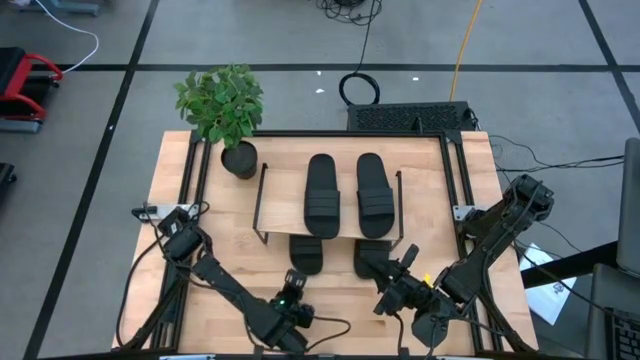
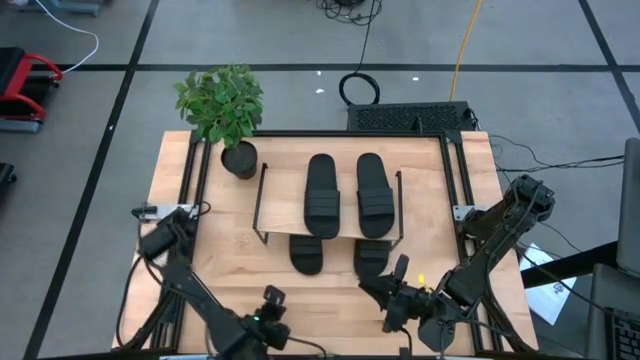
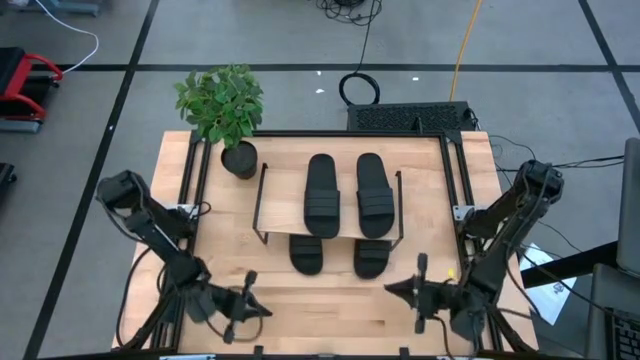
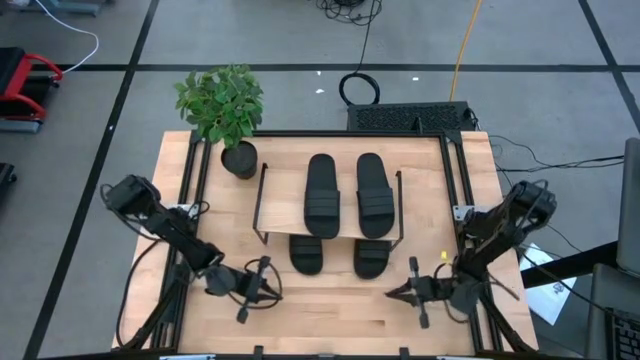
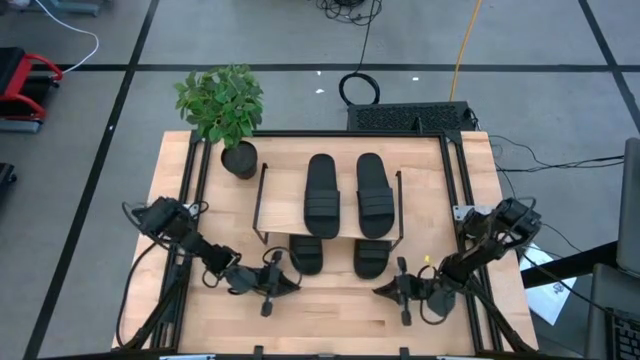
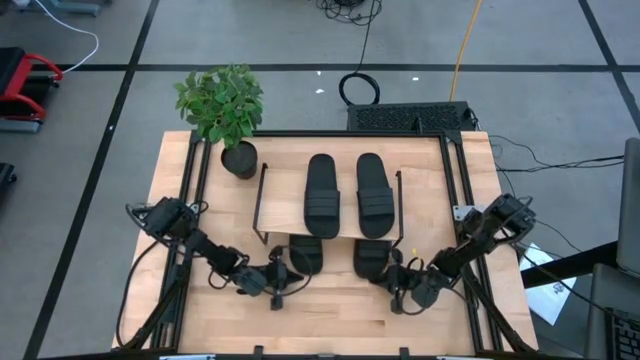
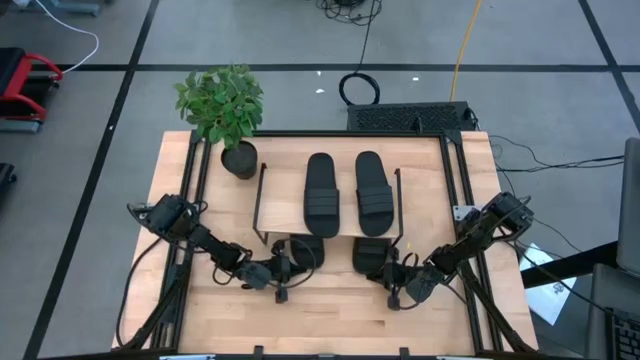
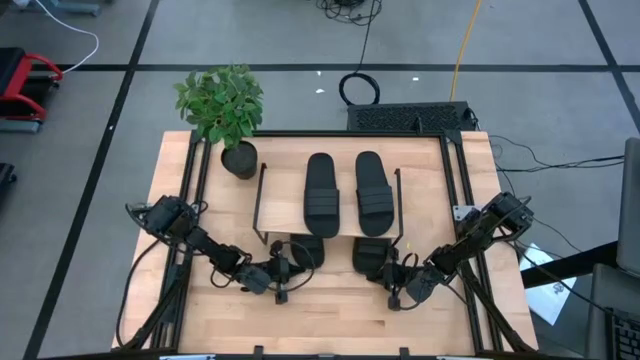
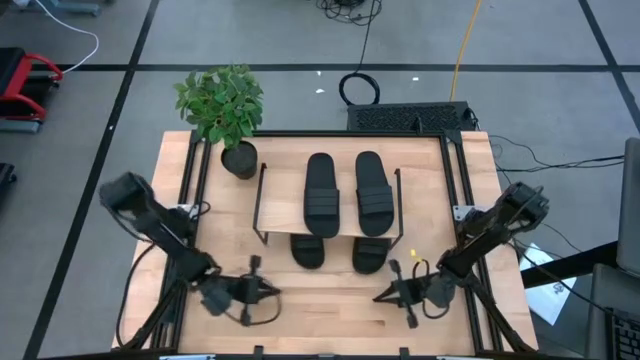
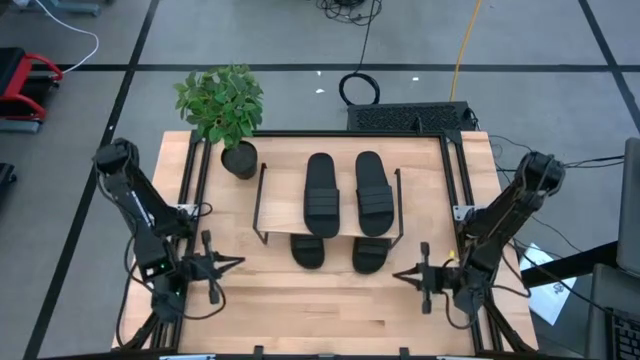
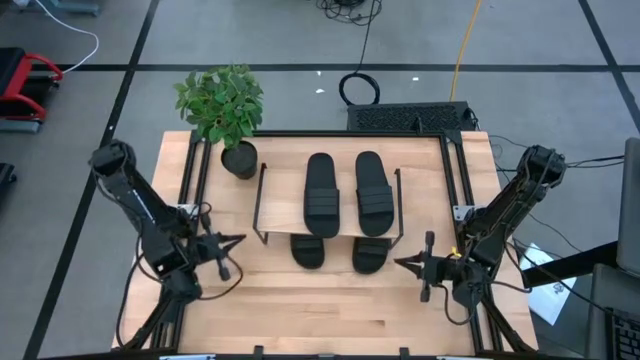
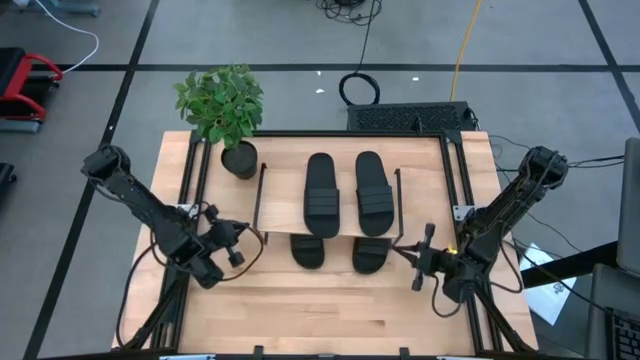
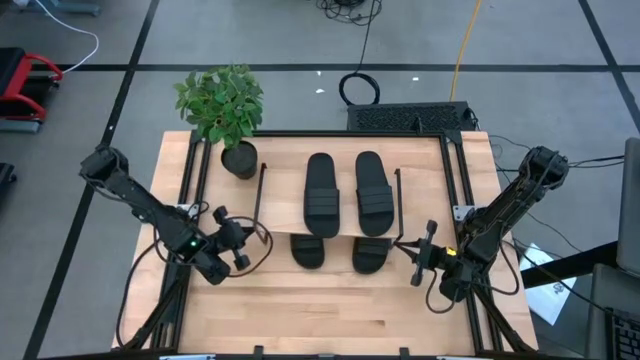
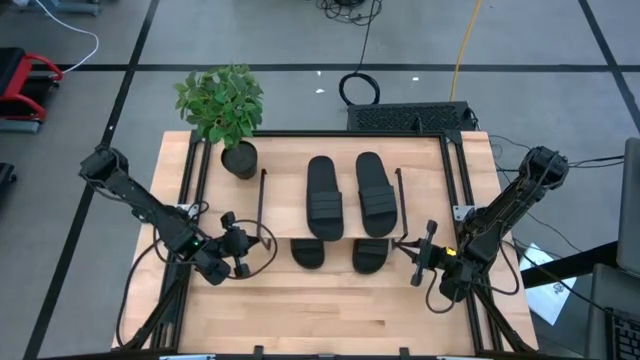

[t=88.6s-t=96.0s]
Task: Pick and place slides into the shelf
Adjust the slides under the shelf and on the shelf

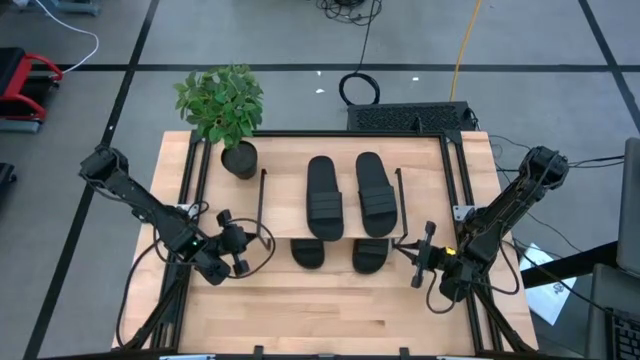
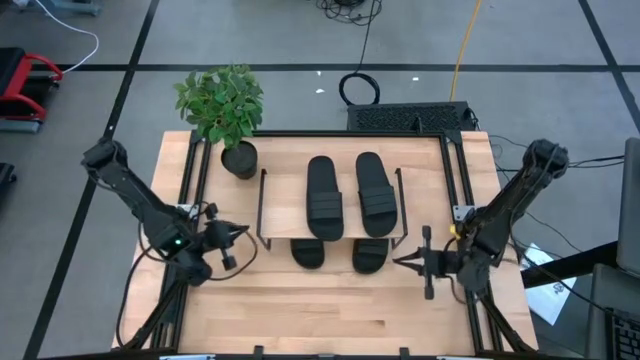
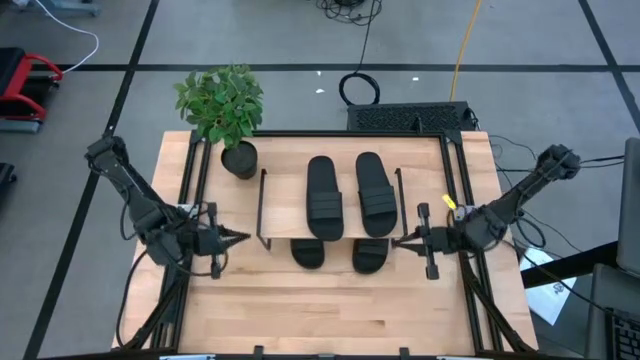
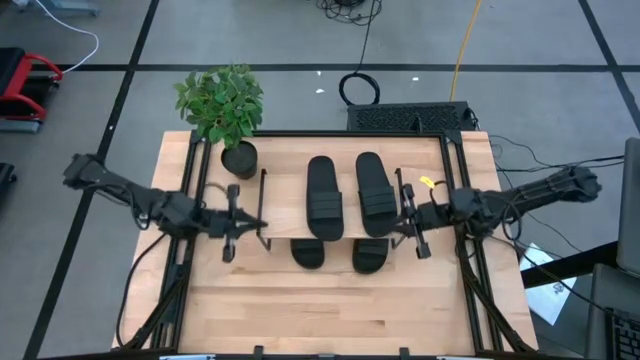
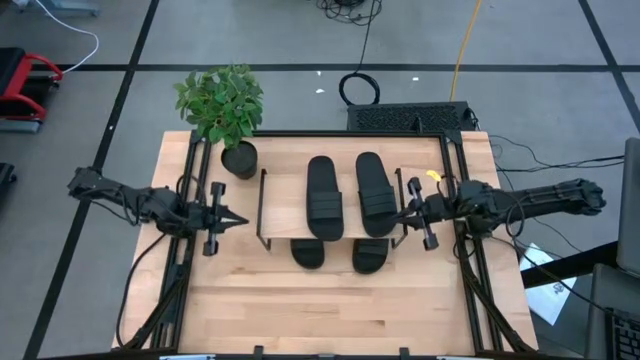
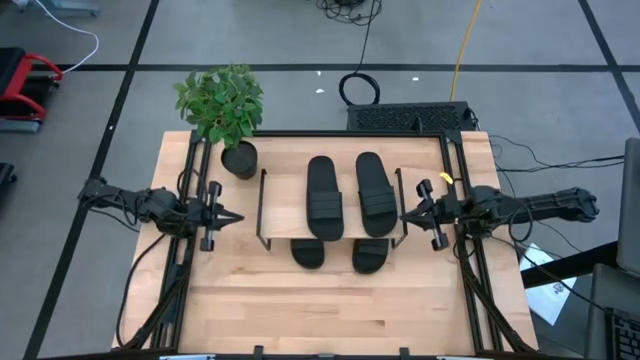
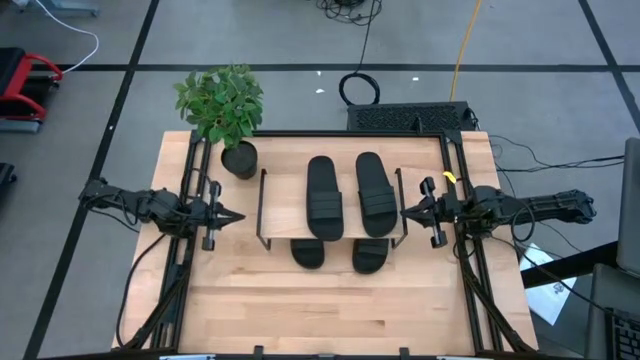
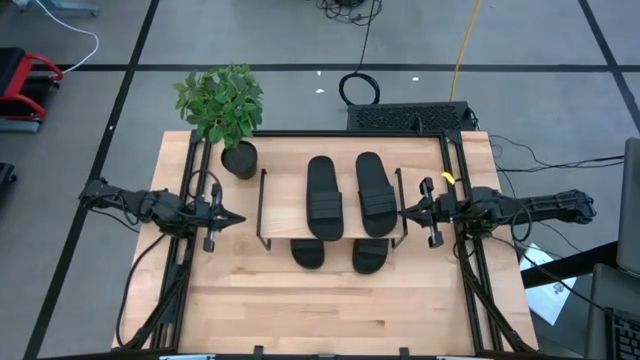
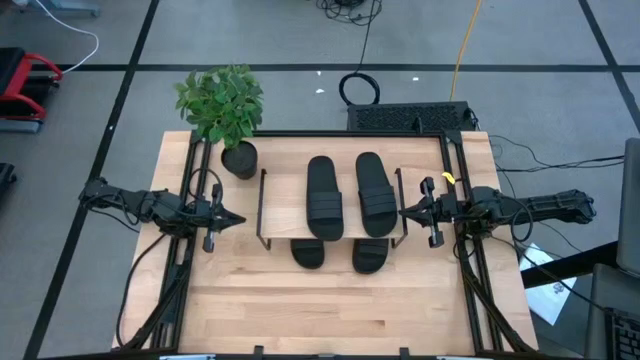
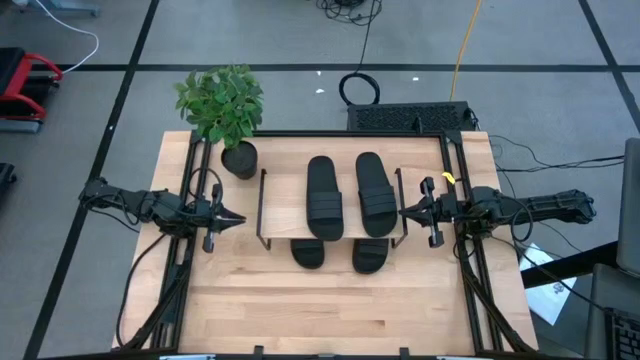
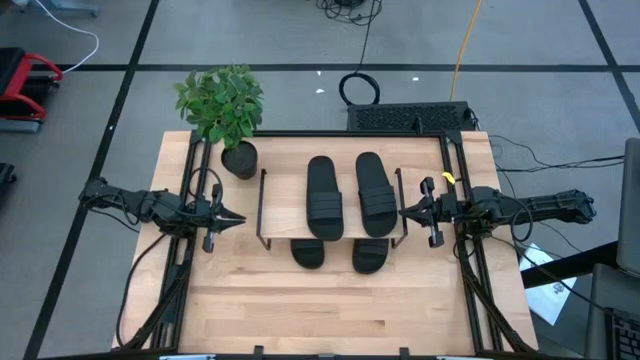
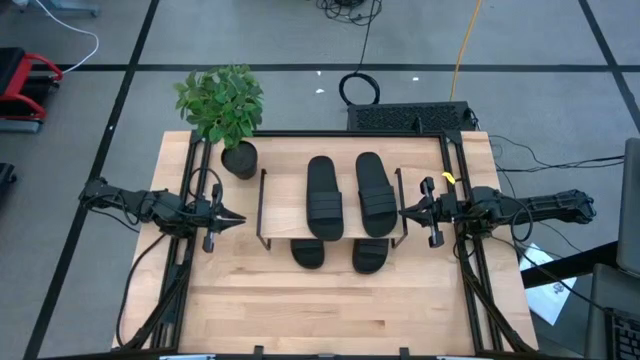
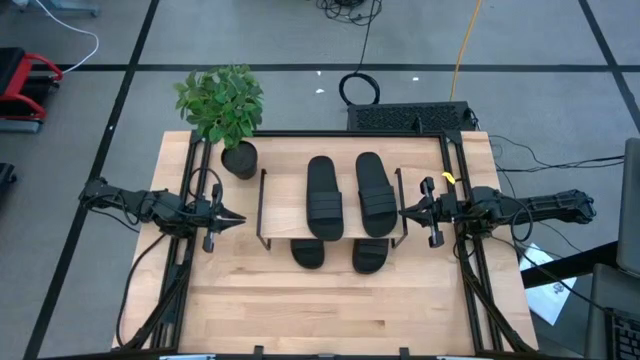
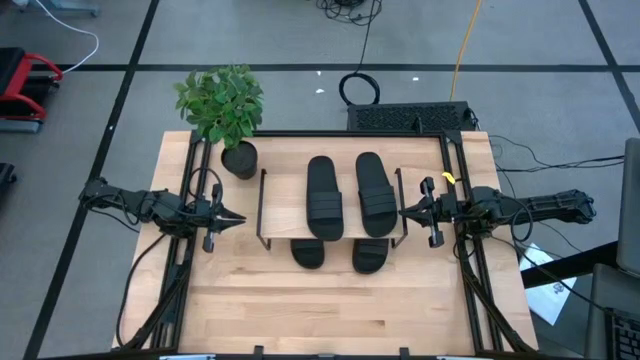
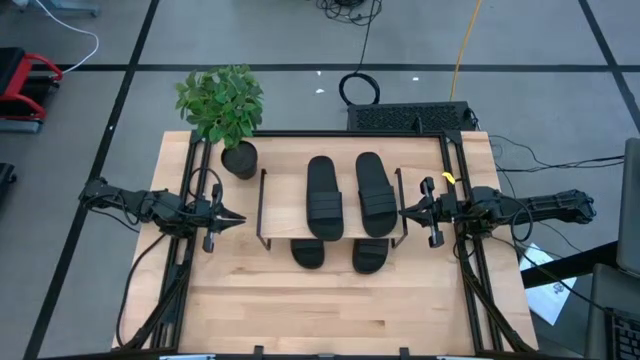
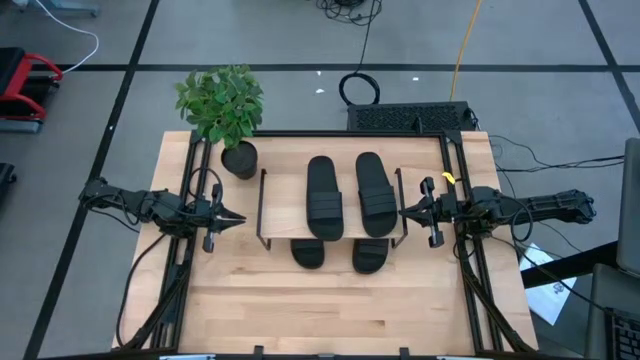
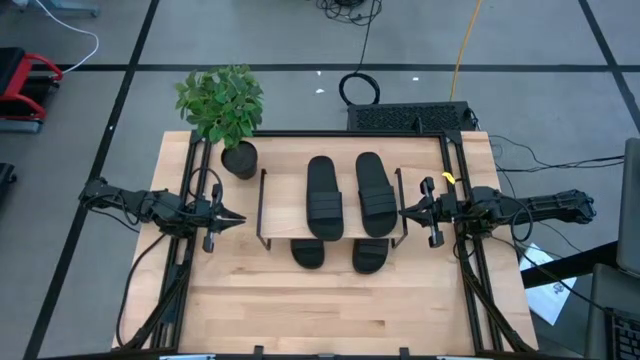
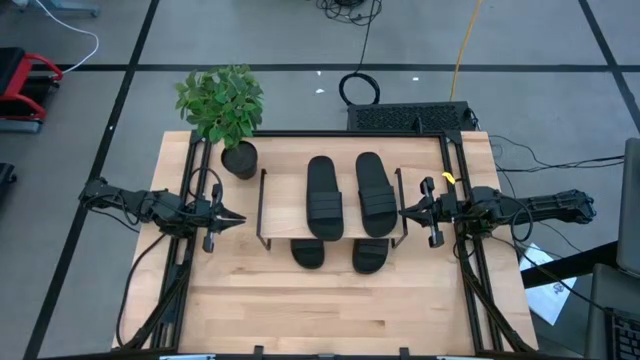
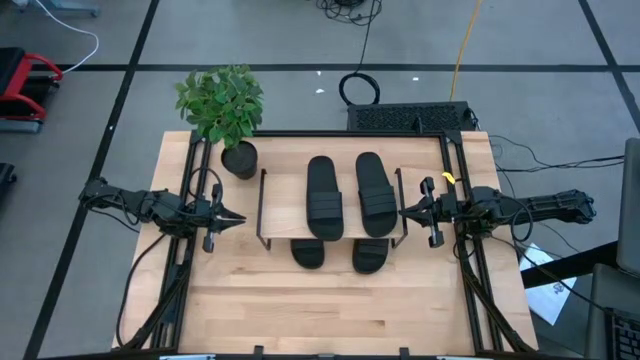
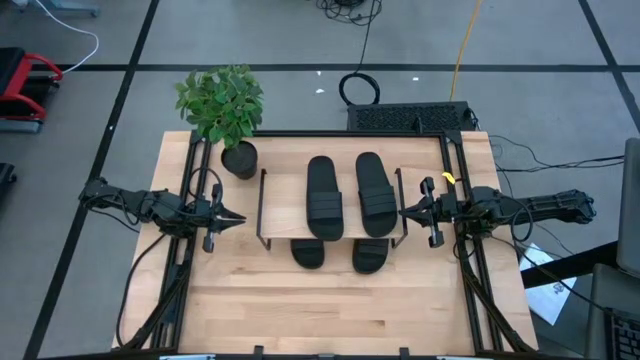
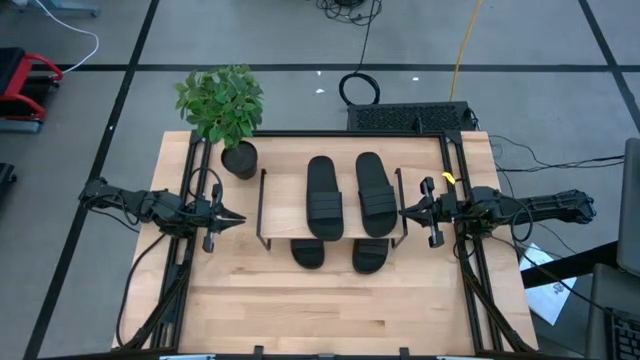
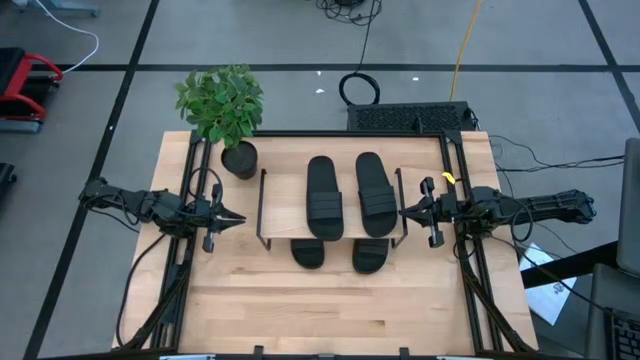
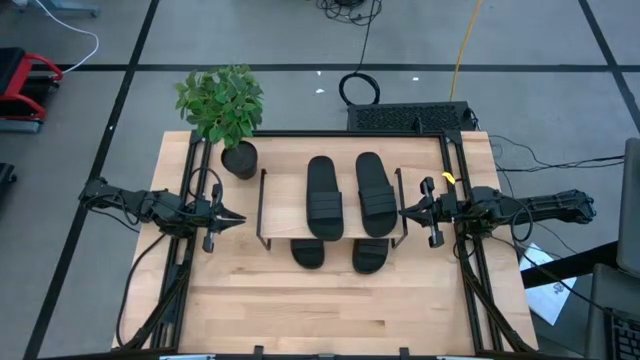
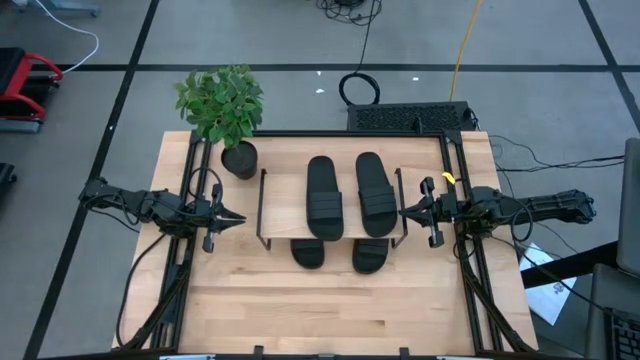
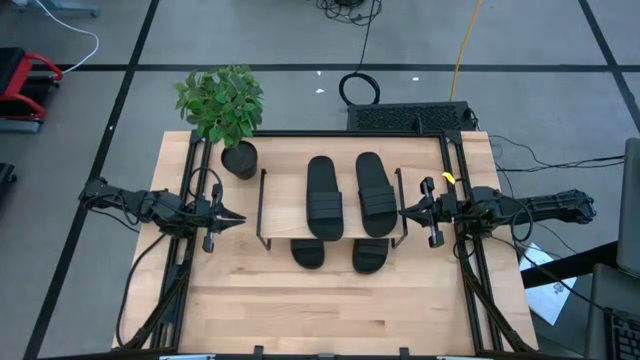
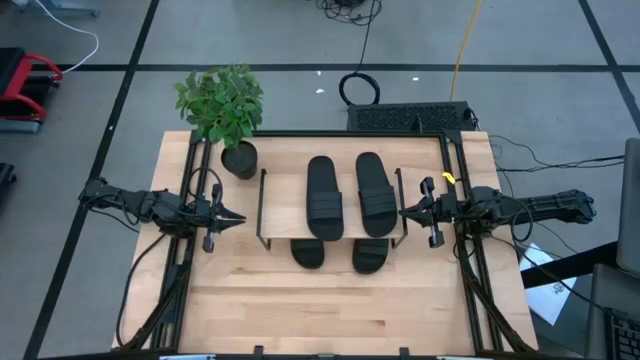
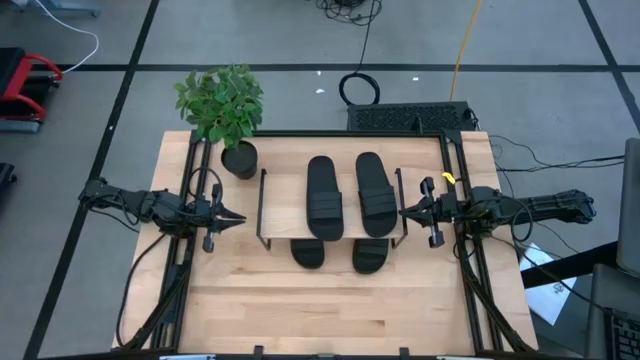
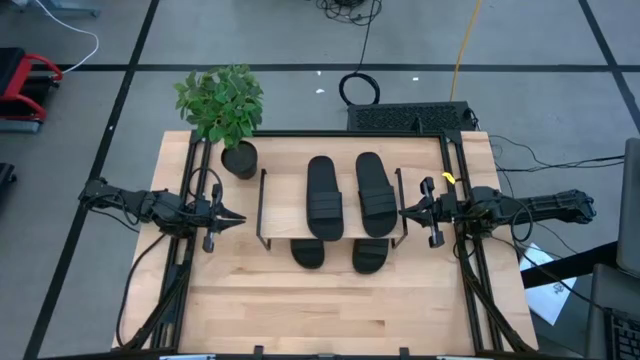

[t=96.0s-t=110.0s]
Return to Home Position
